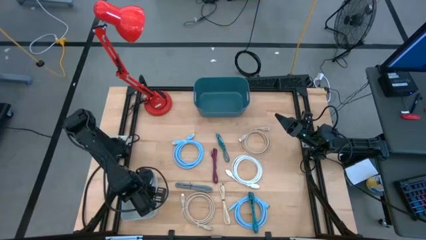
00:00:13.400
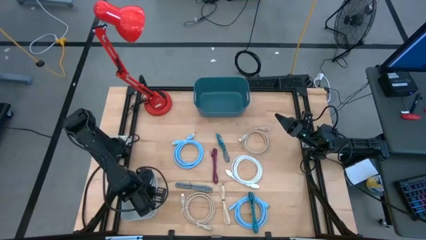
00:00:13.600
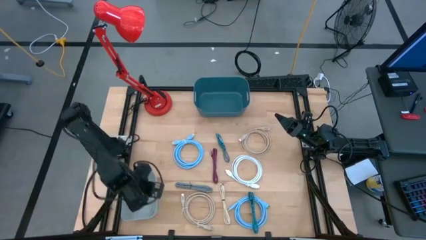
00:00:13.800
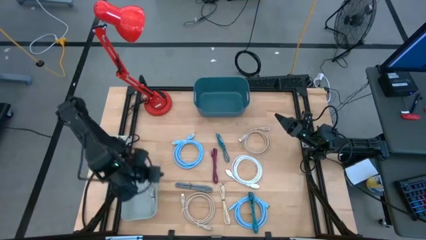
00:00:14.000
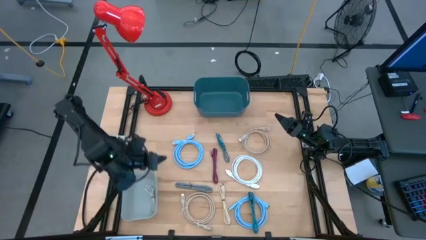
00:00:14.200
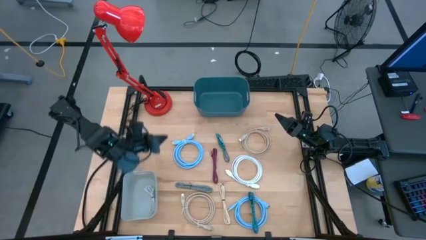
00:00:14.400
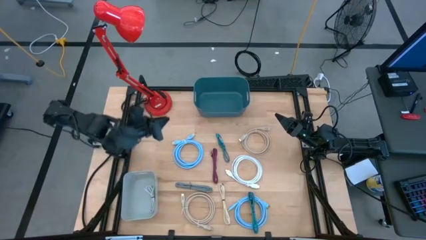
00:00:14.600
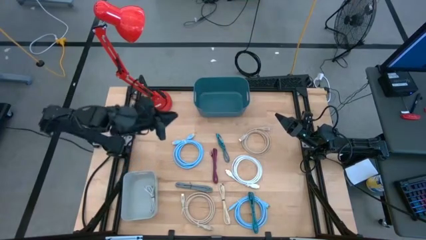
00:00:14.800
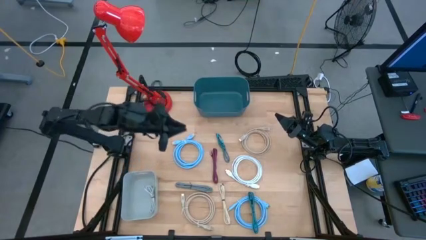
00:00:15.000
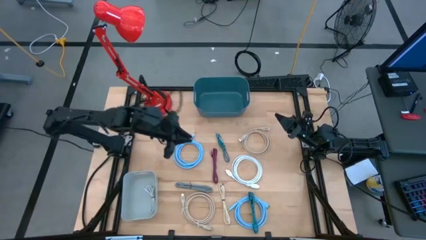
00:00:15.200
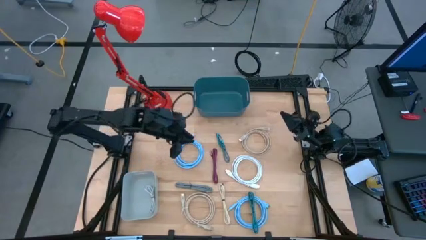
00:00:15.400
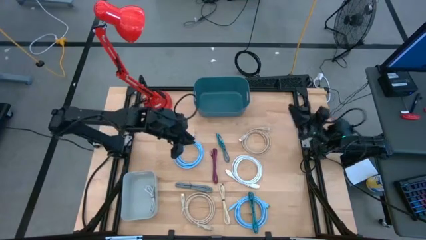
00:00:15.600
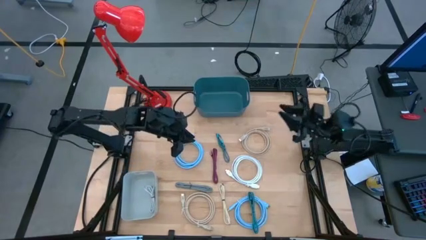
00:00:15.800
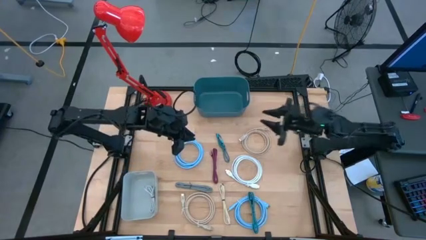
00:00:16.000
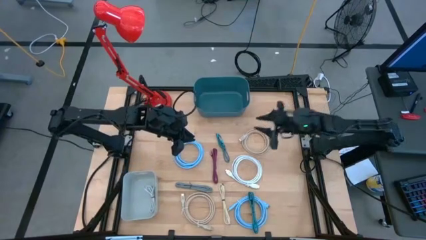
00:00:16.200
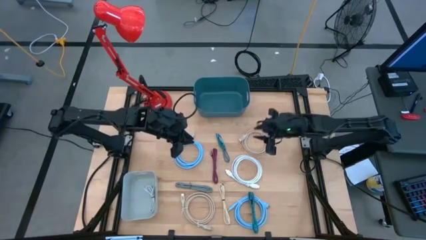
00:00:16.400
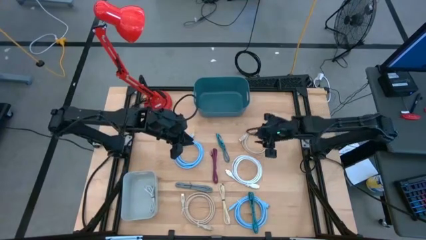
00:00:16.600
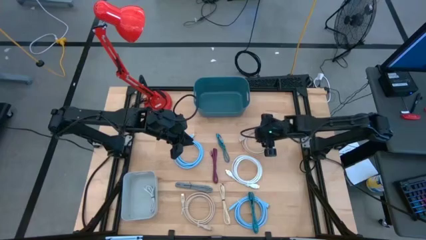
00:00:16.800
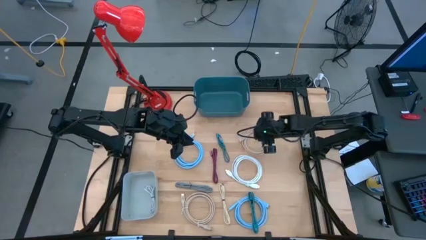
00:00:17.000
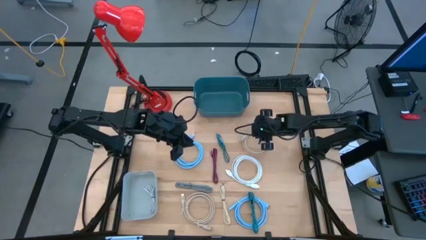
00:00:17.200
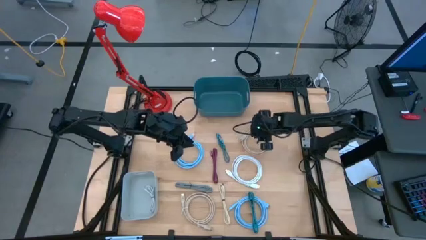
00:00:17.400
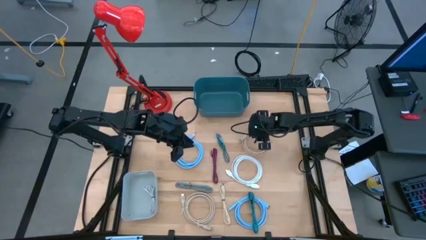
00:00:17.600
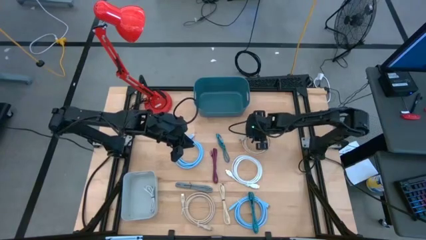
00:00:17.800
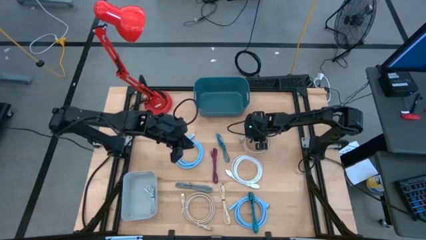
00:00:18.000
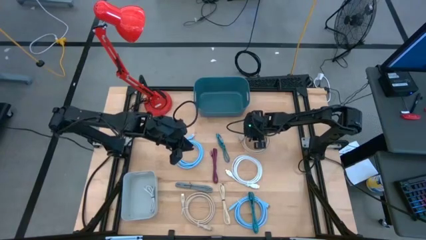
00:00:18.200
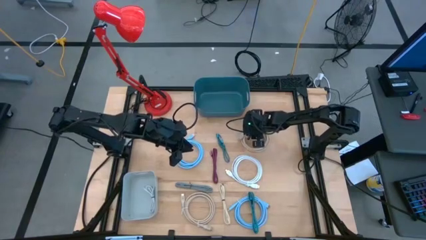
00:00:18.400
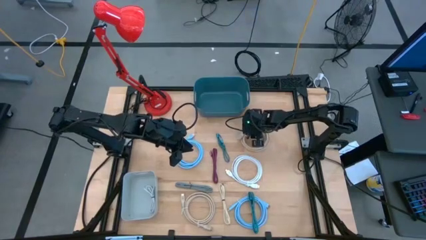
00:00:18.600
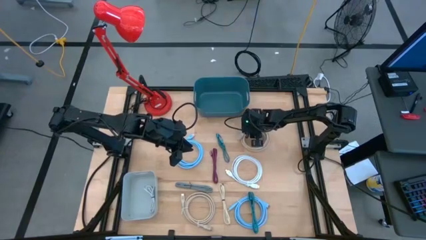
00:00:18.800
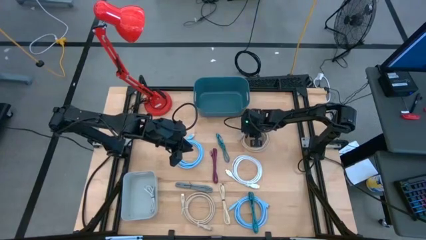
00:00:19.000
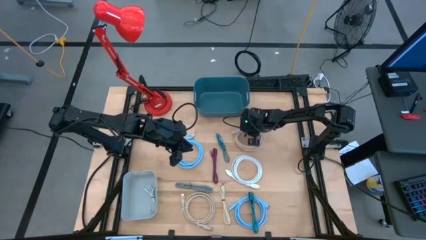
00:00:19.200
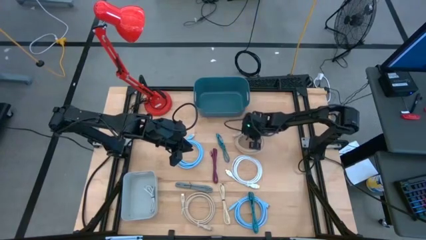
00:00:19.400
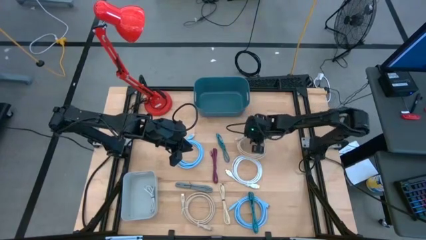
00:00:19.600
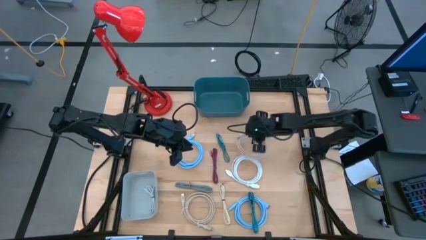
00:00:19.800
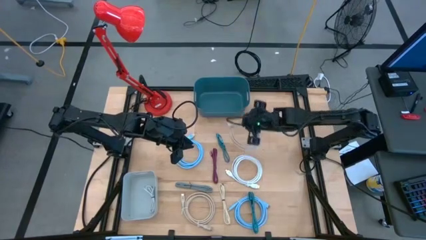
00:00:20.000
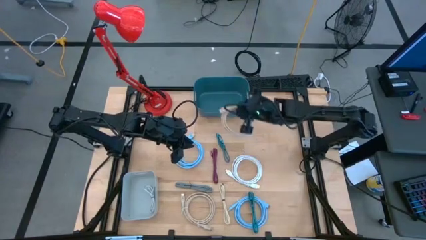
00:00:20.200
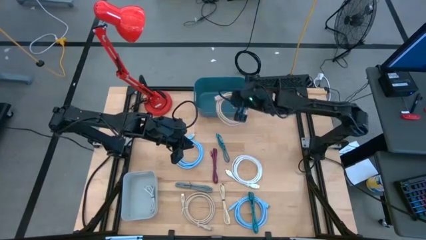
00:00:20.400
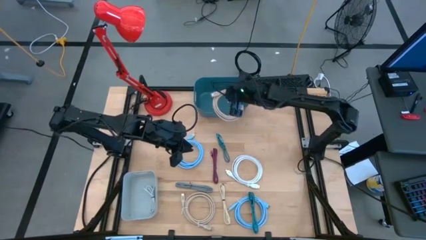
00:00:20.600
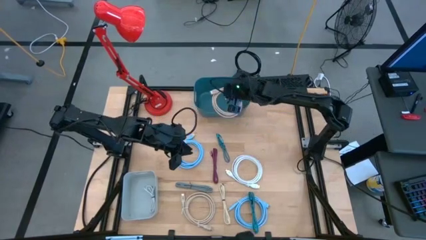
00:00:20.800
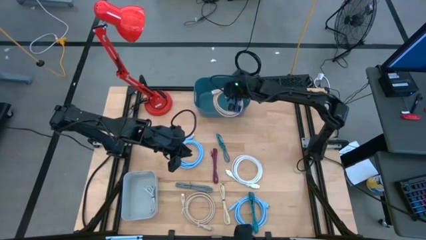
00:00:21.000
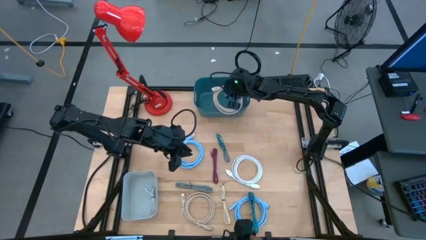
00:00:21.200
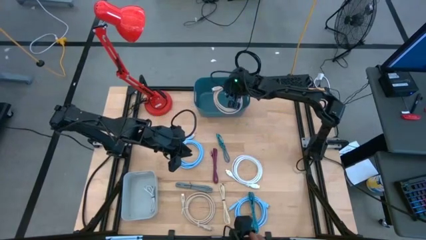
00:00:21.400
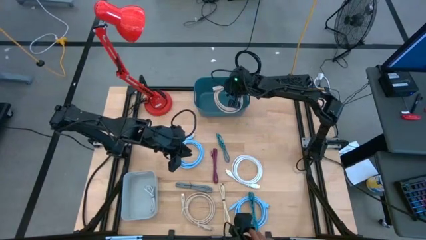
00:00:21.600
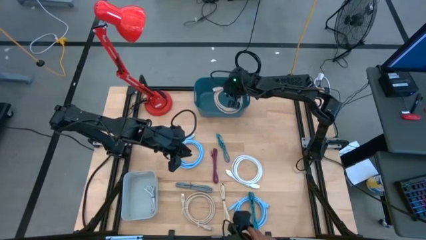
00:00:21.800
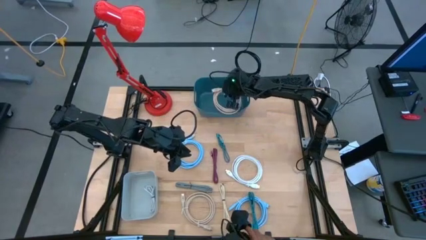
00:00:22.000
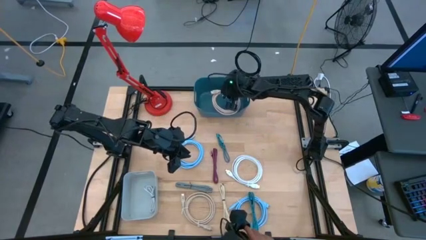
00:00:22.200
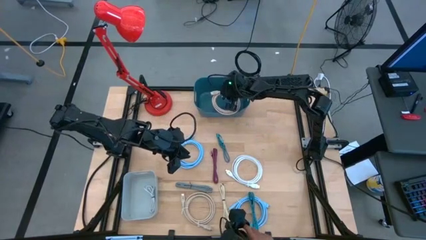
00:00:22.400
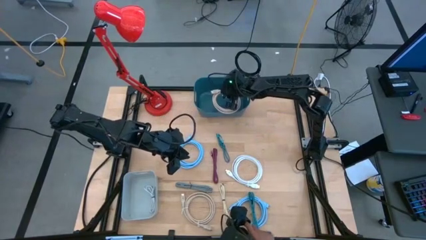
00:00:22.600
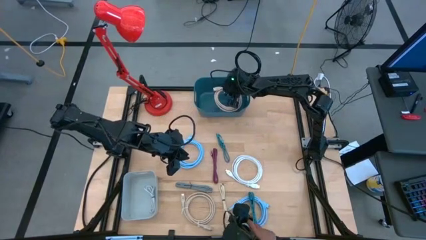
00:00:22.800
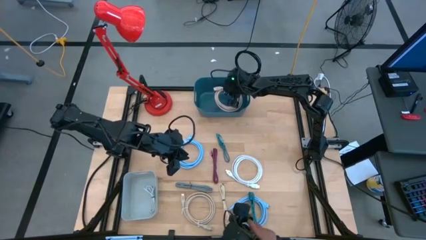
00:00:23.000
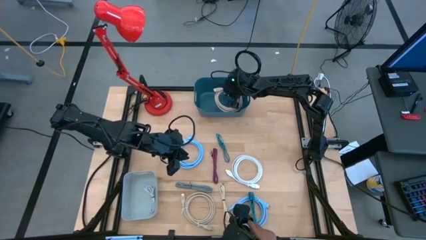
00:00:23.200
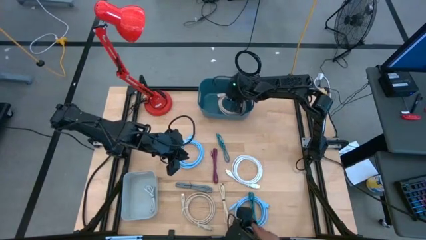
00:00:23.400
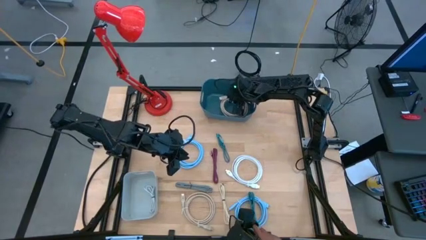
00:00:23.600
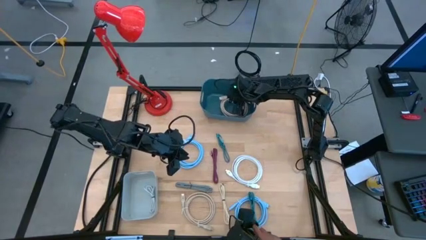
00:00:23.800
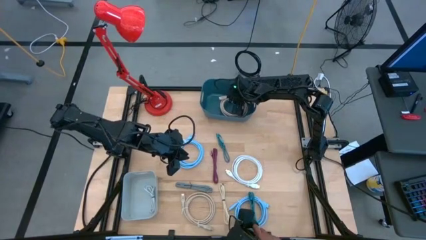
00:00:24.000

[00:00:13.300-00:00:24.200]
Task: Pick & Place USB Port
Put the top gray wire cable into the blue bin
